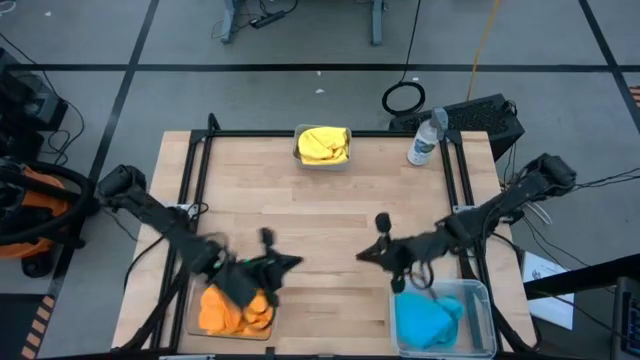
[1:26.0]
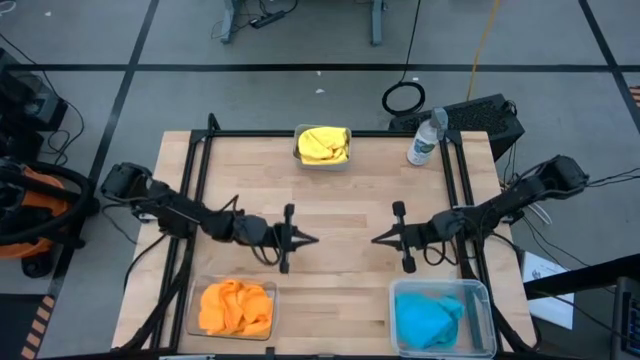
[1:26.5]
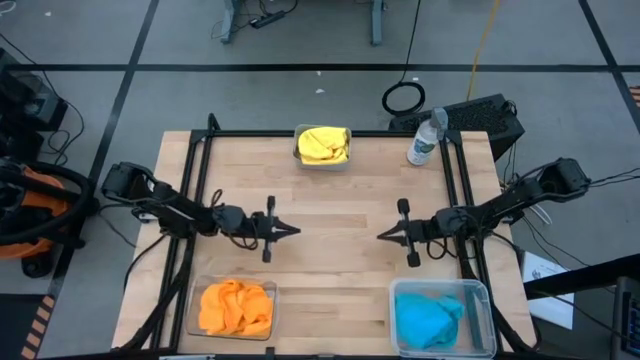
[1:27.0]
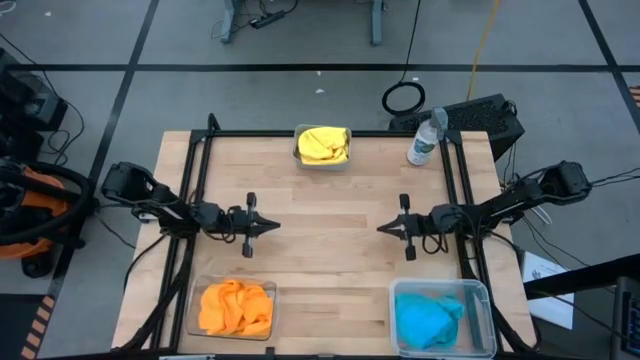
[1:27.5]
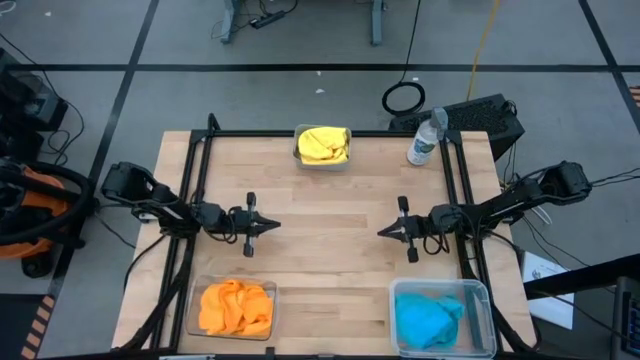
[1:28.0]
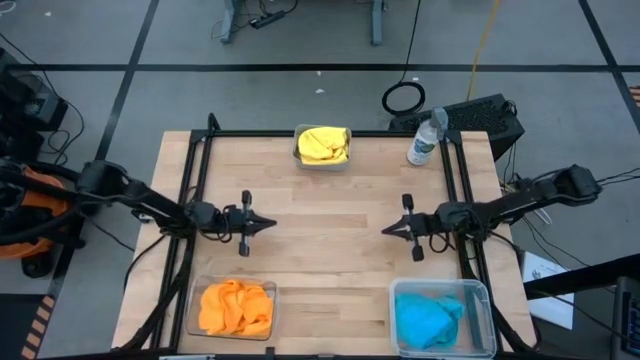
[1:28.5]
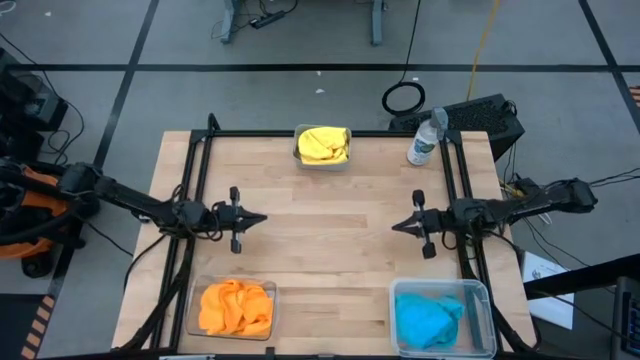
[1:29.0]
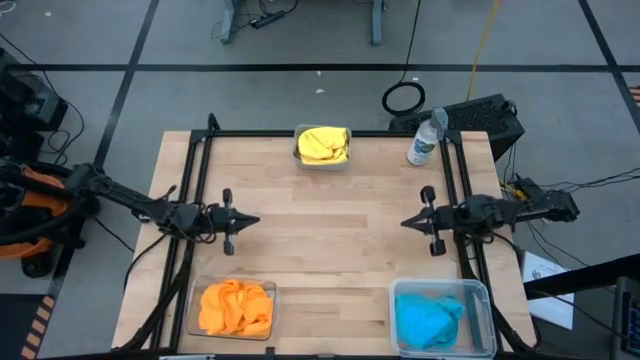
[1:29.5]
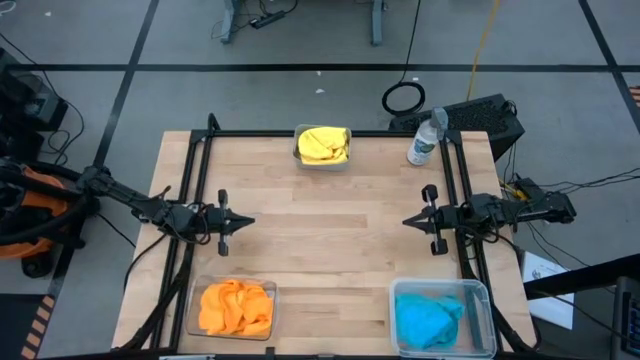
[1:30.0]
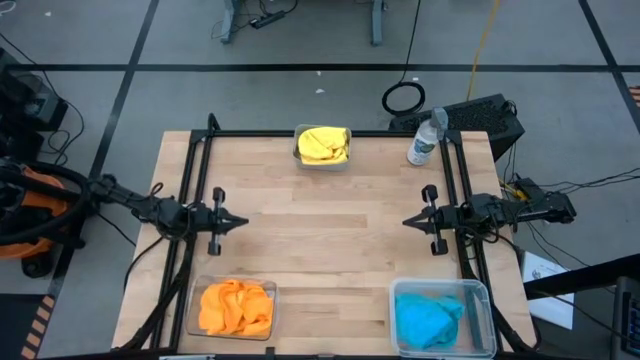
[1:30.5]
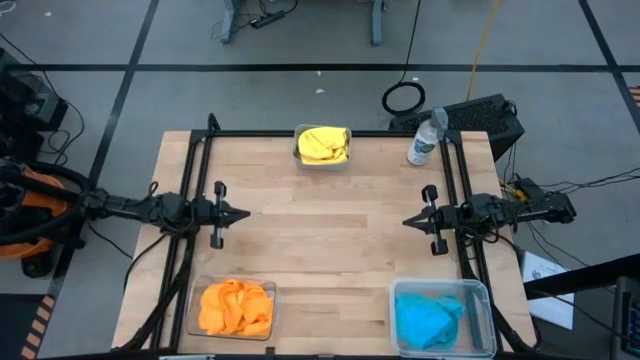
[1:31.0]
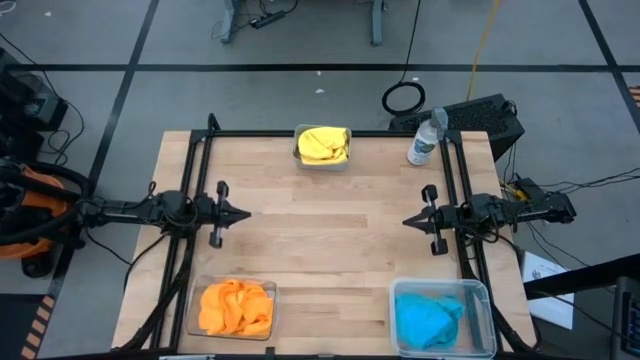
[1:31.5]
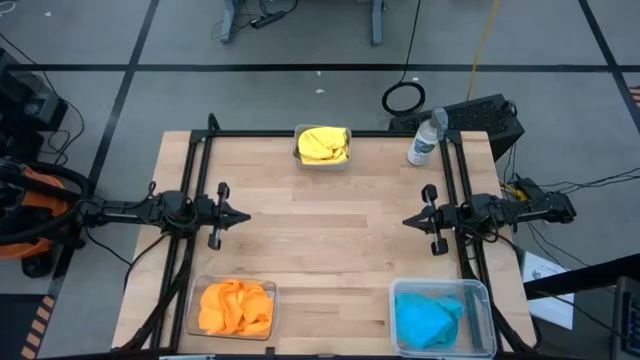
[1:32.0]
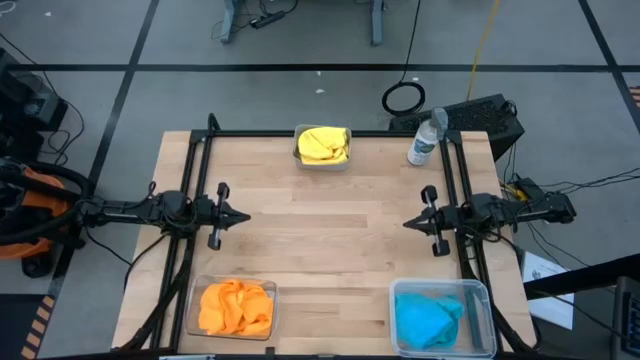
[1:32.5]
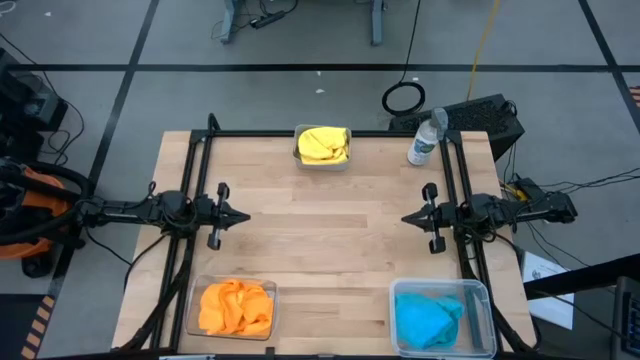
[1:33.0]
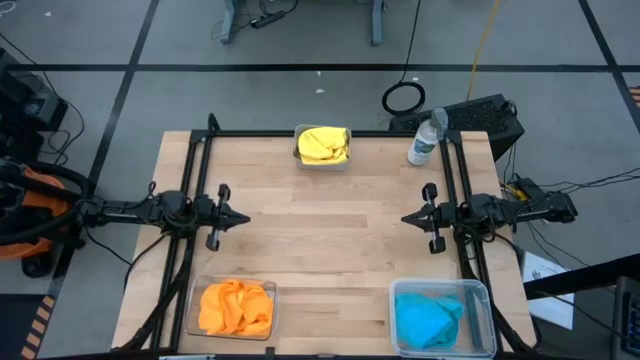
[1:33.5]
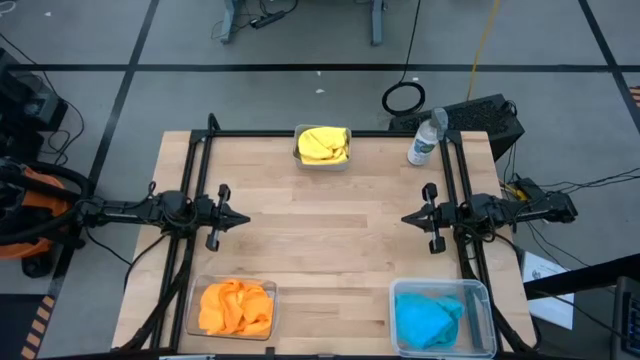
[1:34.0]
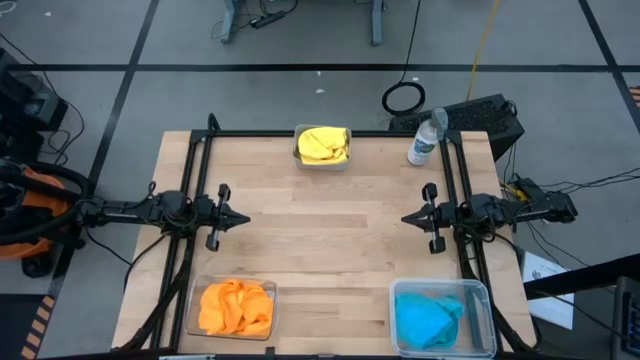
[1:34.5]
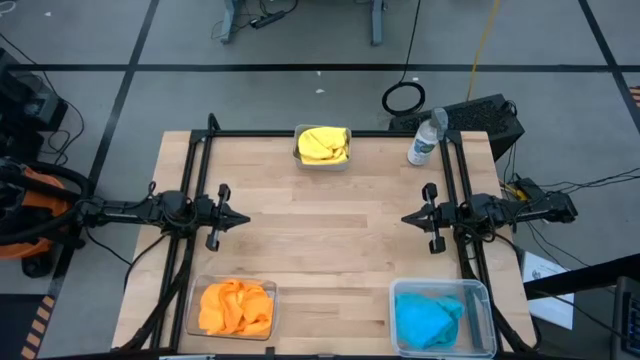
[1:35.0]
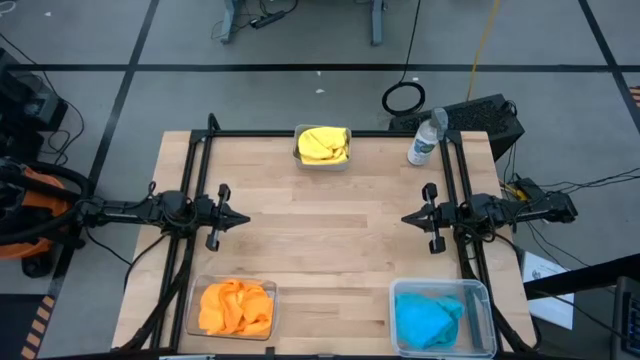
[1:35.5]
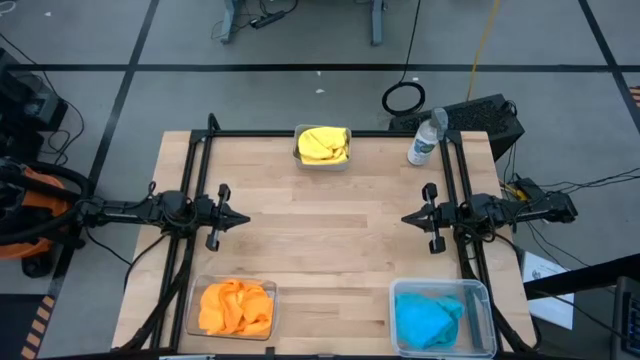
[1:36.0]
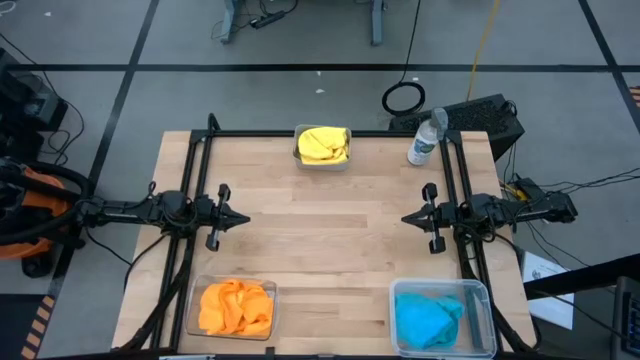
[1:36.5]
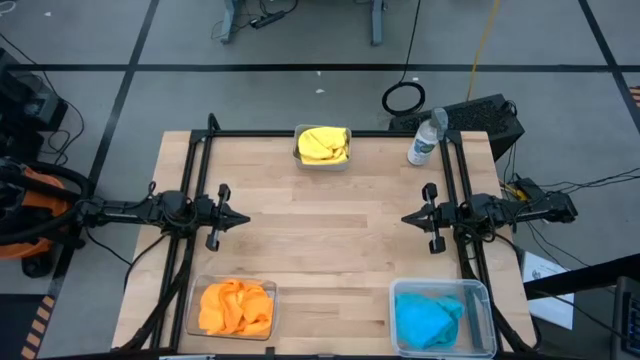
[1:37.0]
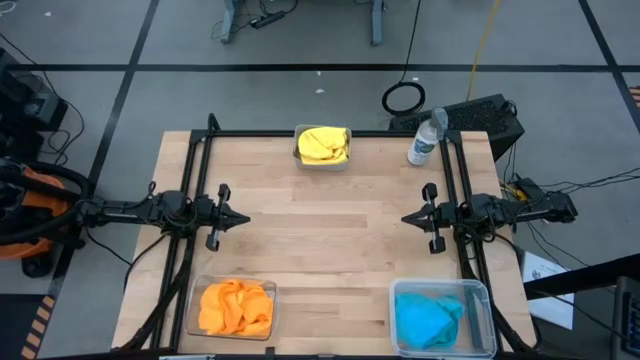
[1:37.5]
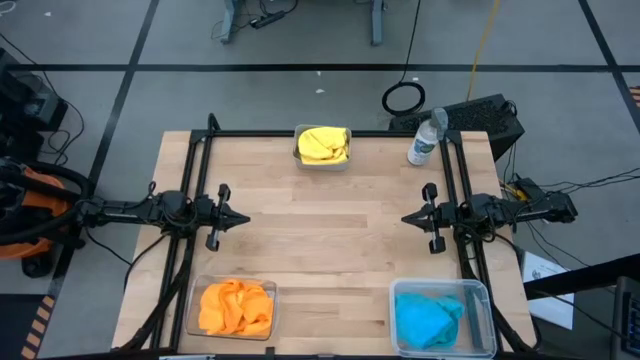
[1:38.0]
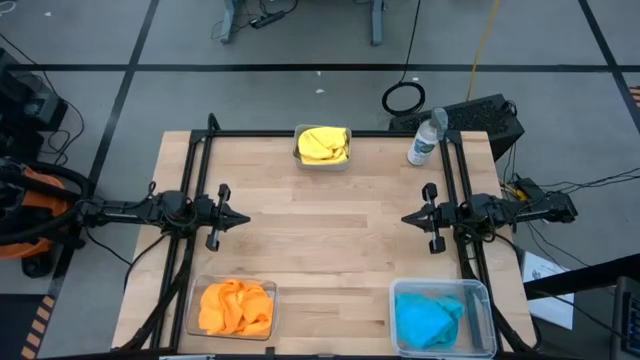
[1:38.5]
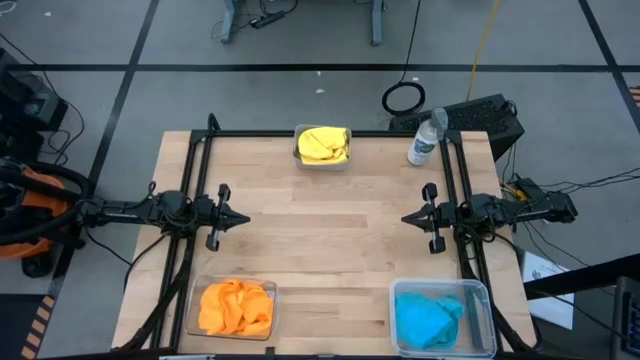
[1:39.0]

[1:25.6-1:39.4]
Task: Sort microfiber towel by color & place in baskets
Return to Home Position

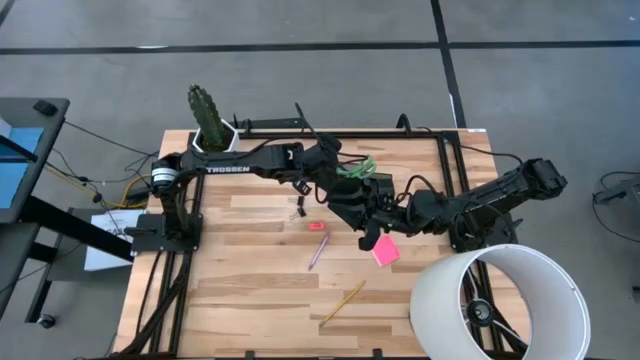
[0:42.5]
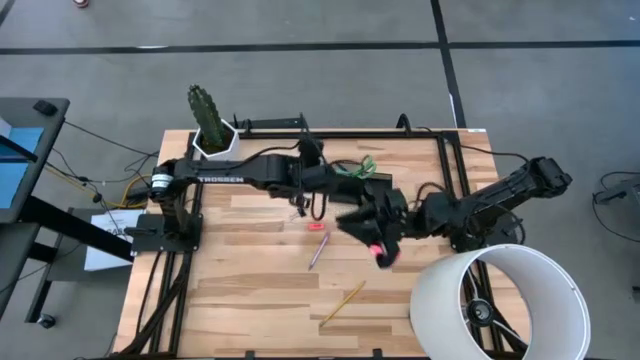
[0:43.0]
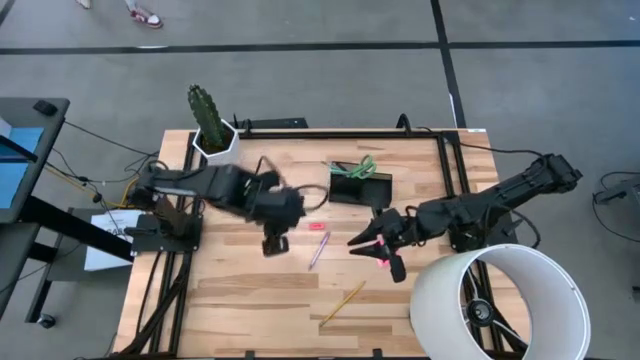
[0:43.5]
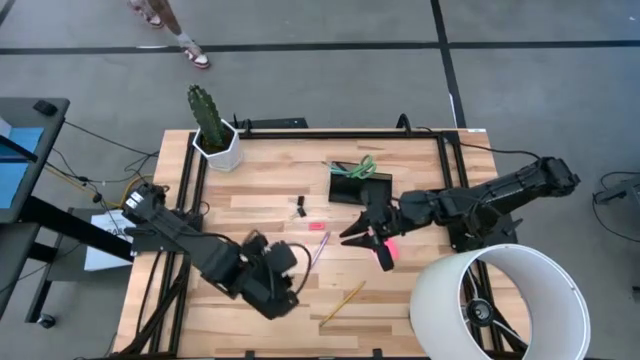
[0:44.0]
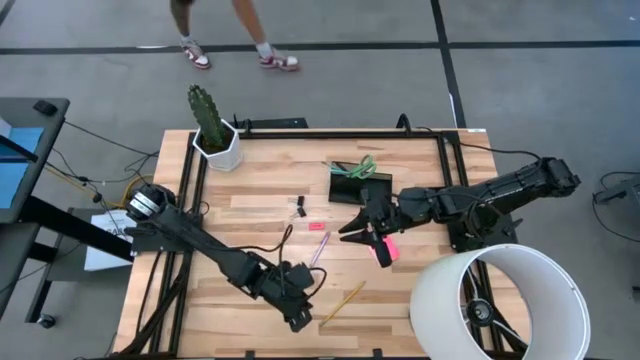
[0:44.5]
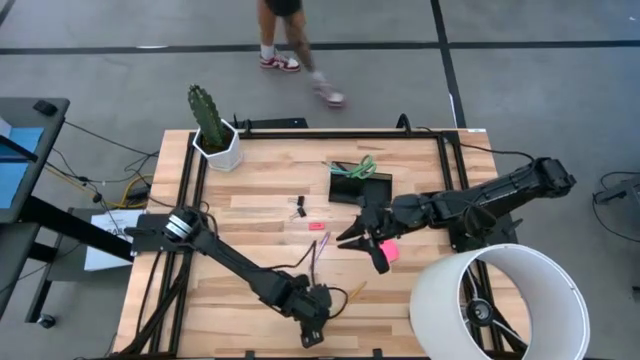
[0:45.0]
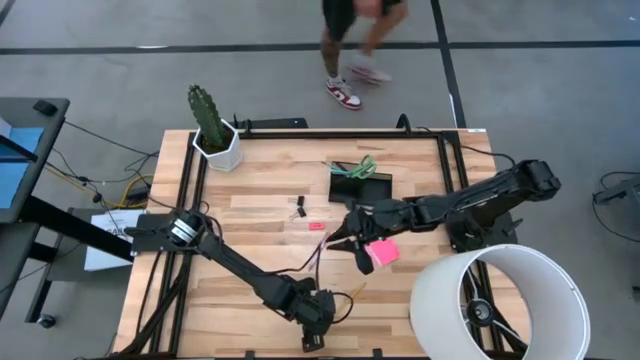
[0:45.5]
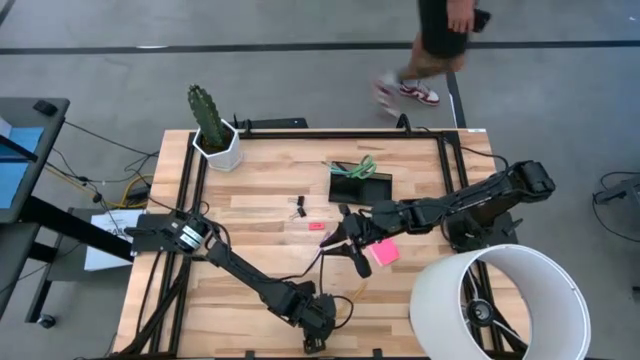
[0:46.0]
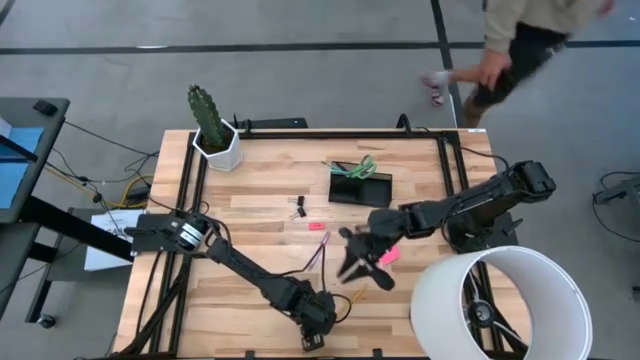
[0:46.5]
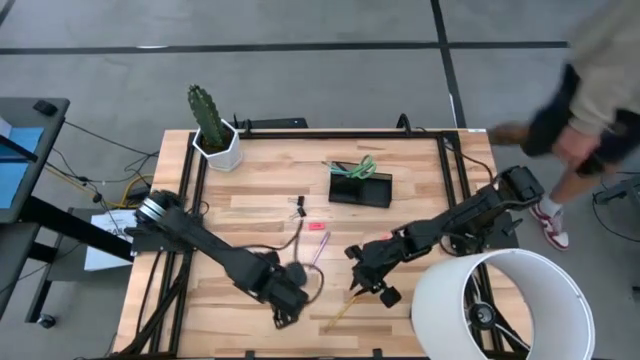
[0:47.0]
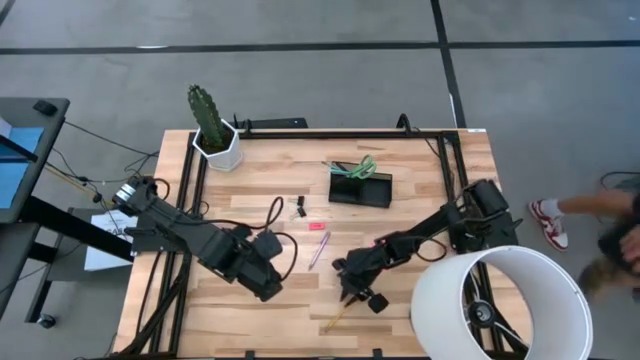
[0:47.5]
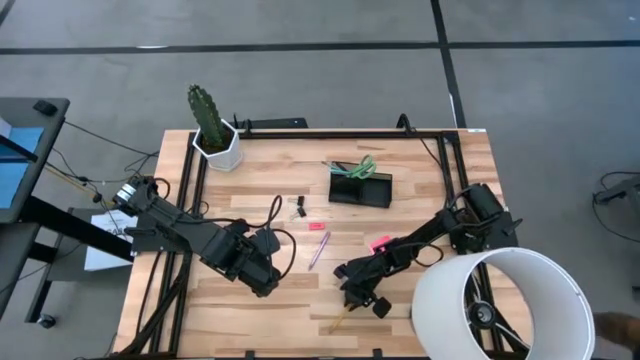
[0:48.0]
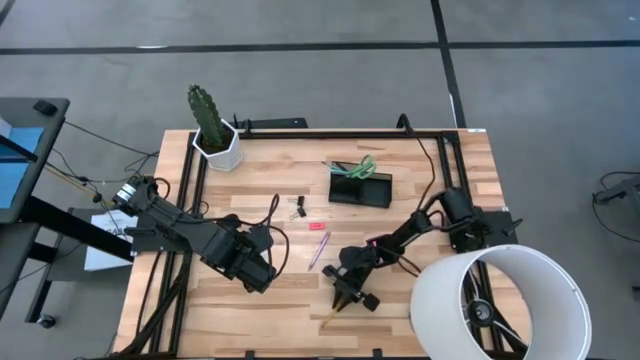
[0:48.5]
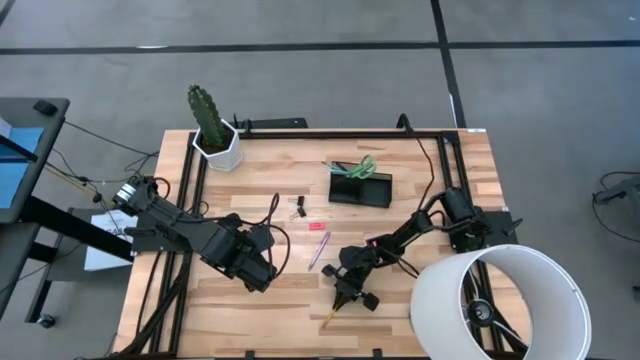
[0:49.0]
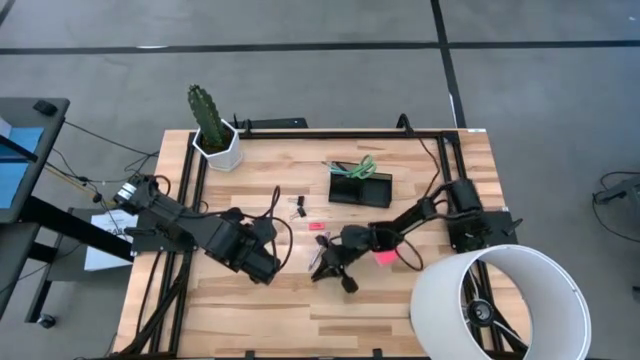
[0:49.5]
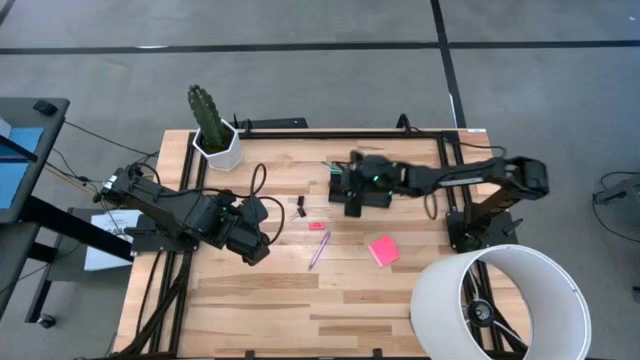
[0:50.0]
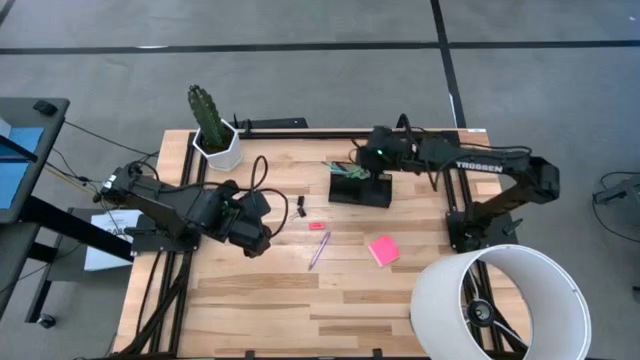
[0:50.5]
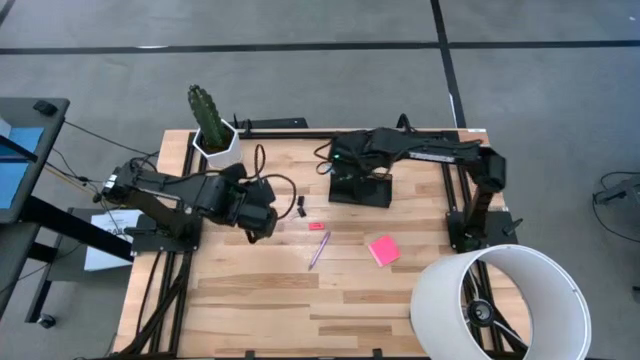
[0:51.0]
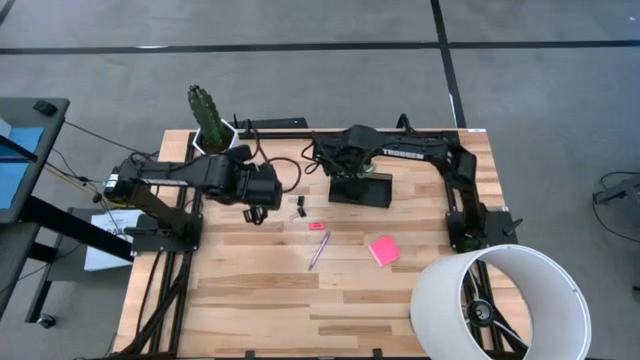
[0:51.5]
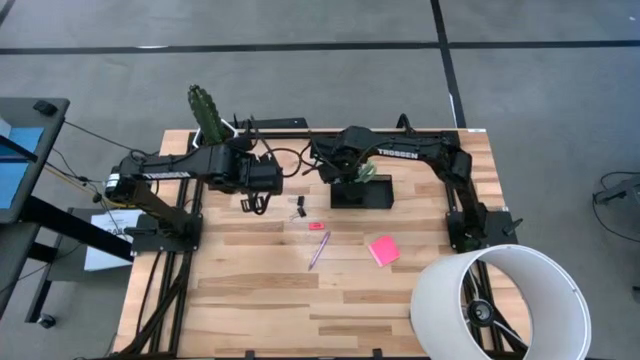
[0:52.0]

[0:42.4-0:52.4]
Task: Pick and place office supplies into organizer
Put the yellow pencil into the black desk organizer
